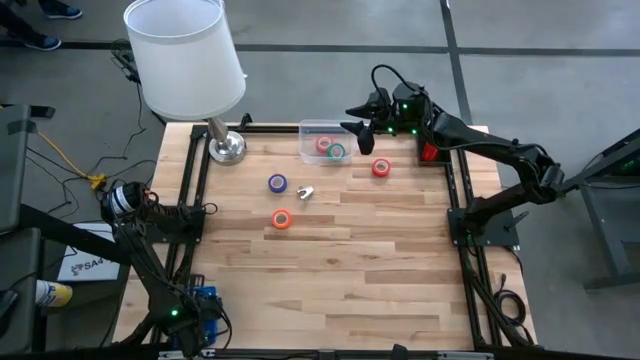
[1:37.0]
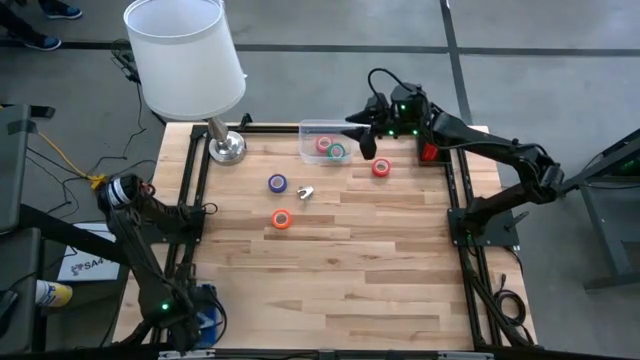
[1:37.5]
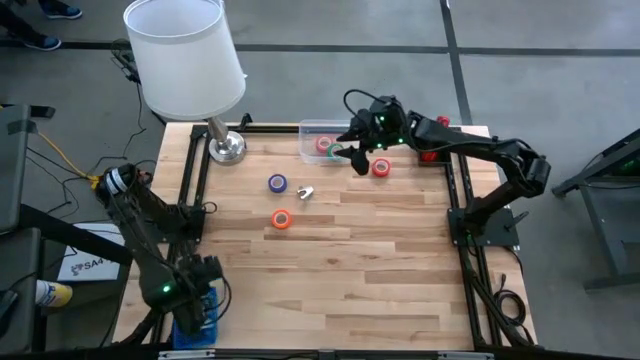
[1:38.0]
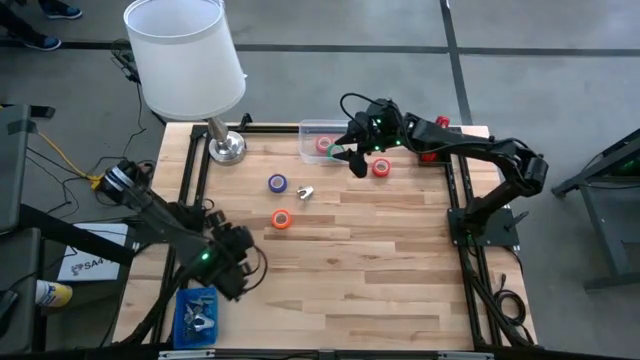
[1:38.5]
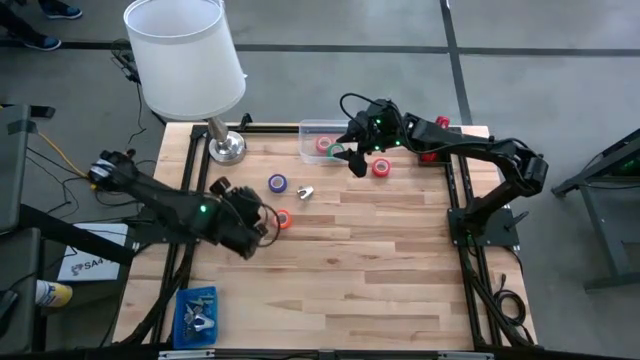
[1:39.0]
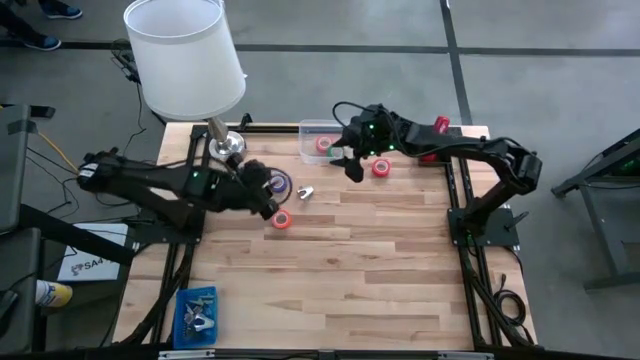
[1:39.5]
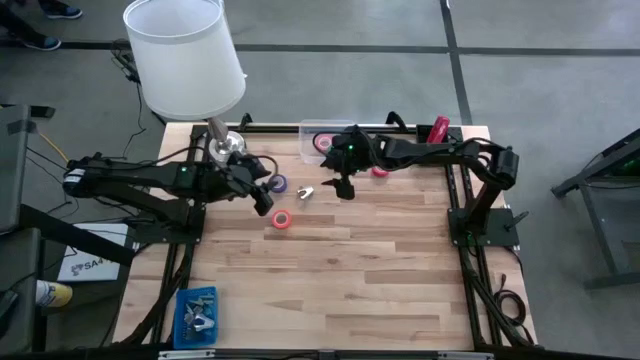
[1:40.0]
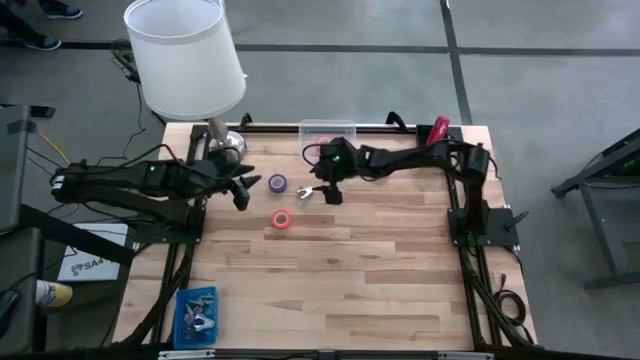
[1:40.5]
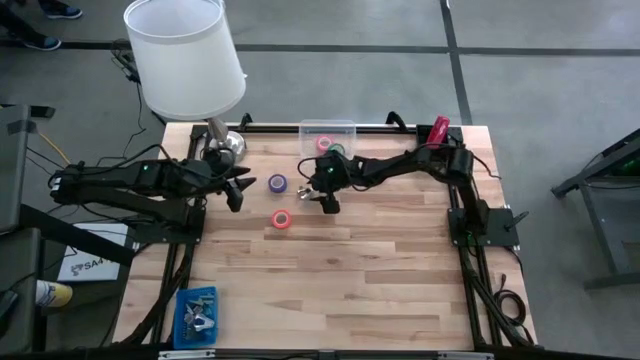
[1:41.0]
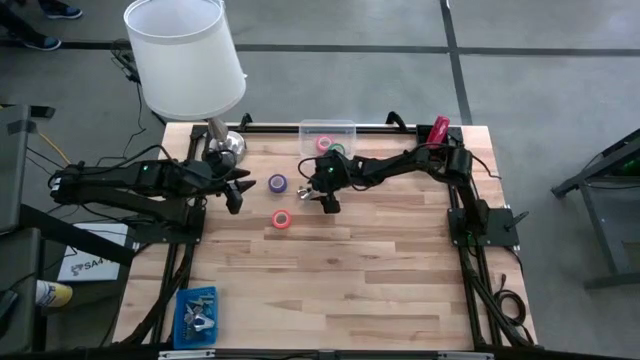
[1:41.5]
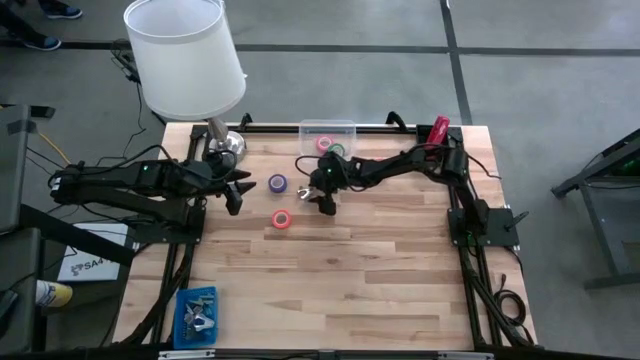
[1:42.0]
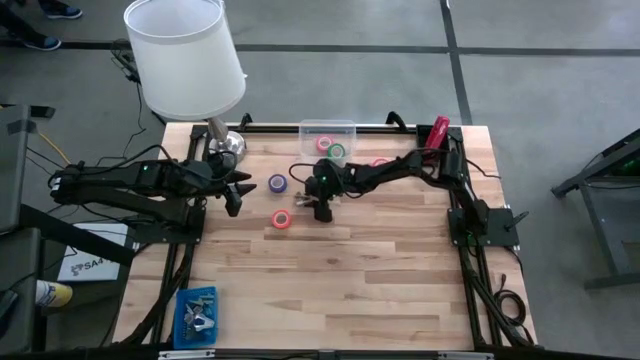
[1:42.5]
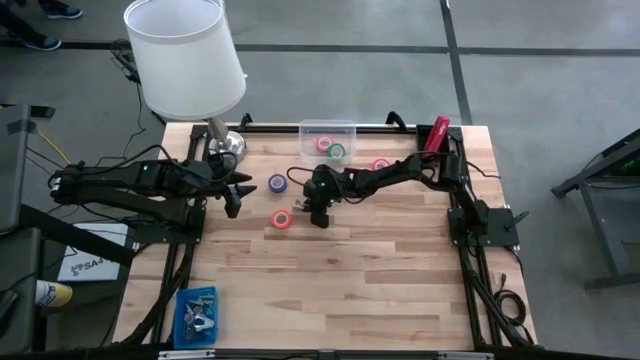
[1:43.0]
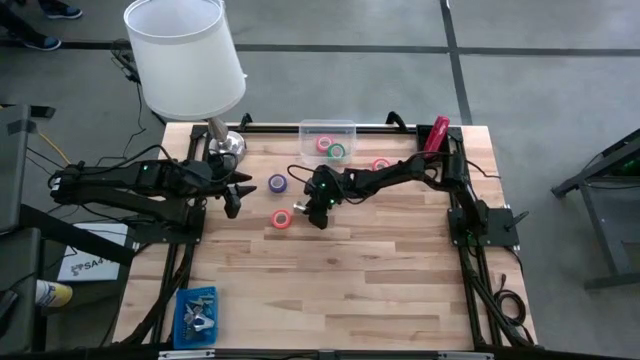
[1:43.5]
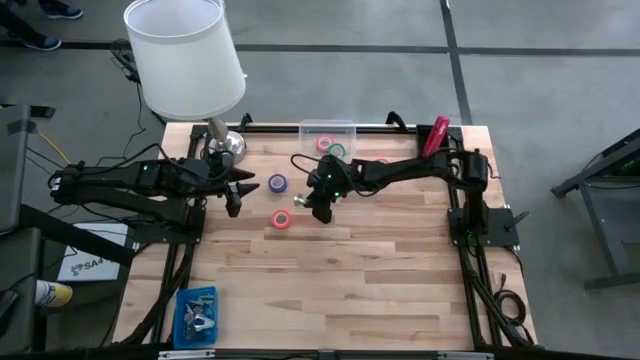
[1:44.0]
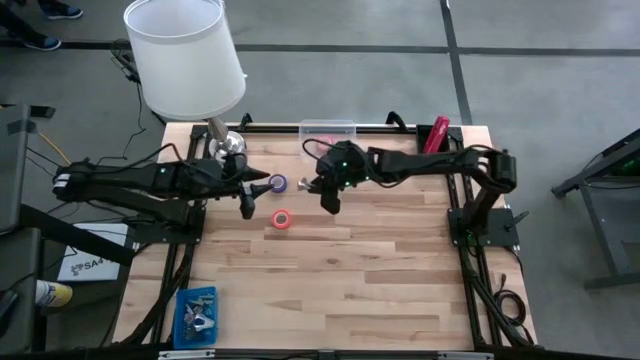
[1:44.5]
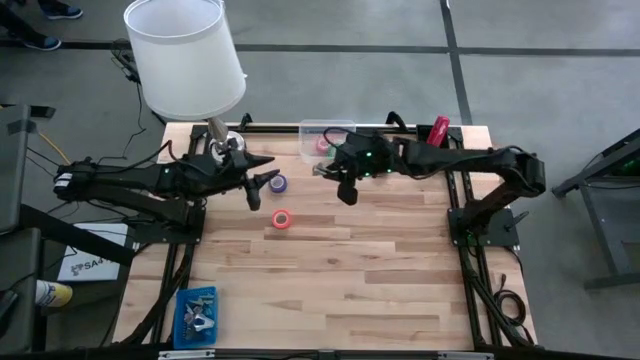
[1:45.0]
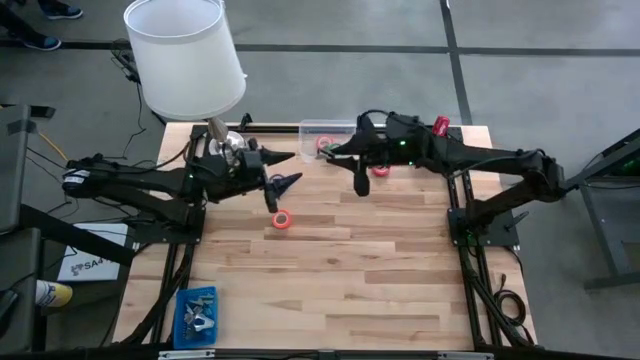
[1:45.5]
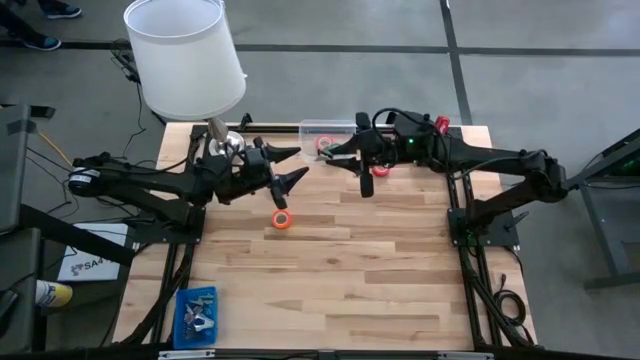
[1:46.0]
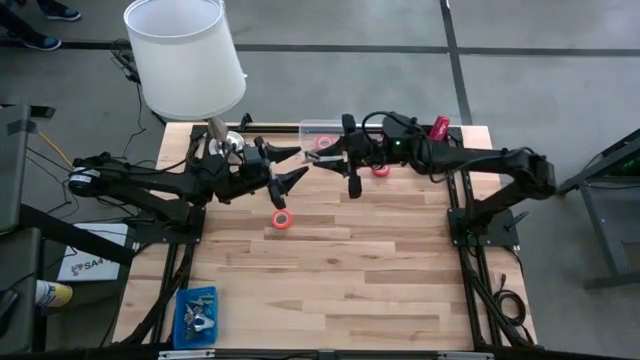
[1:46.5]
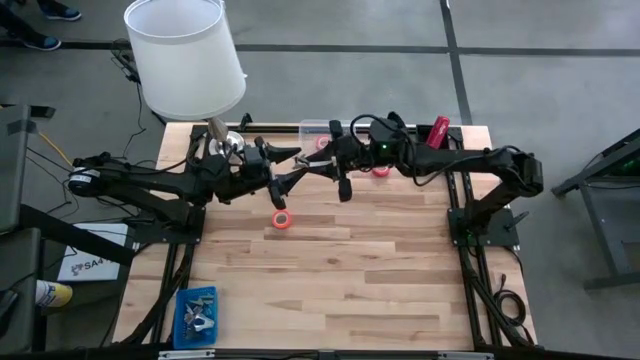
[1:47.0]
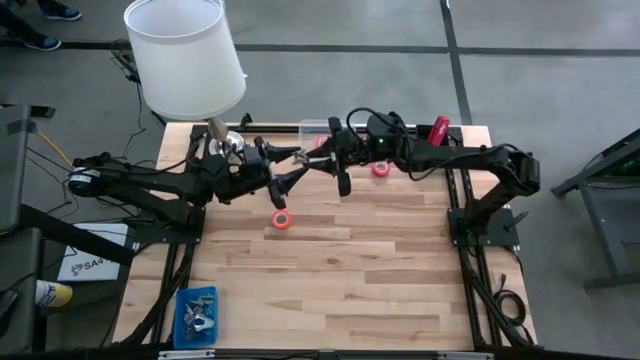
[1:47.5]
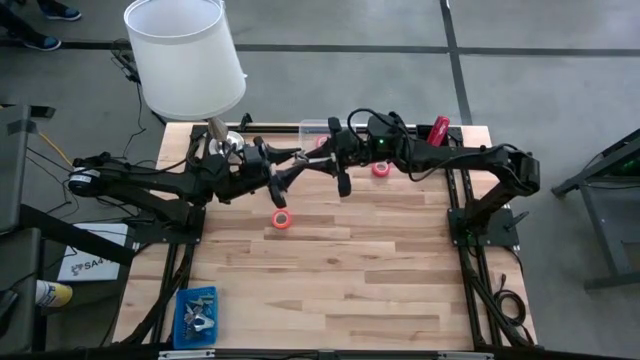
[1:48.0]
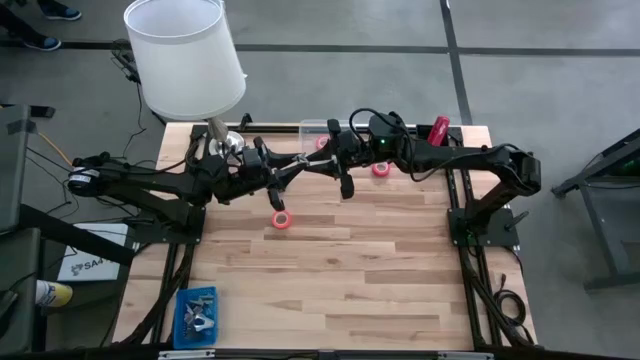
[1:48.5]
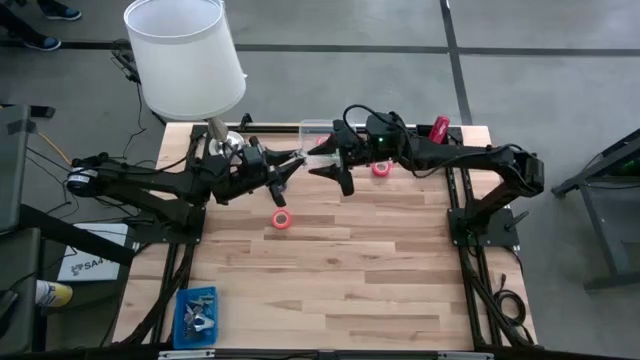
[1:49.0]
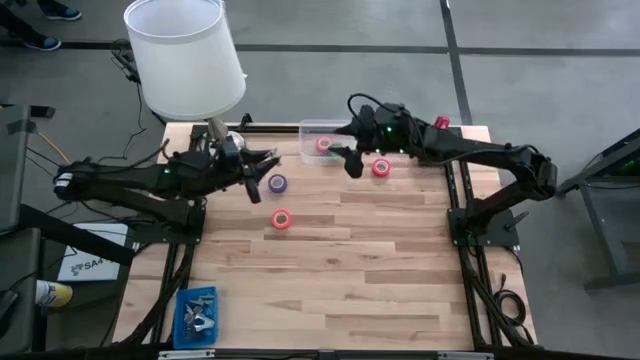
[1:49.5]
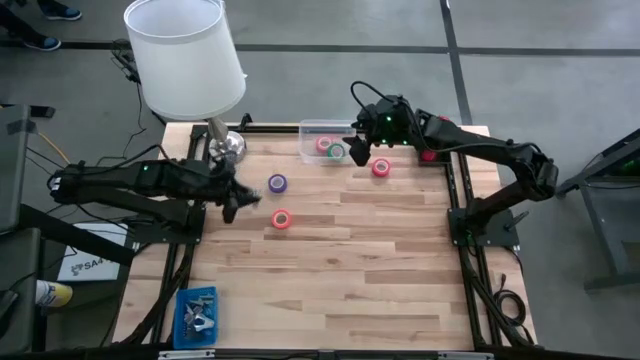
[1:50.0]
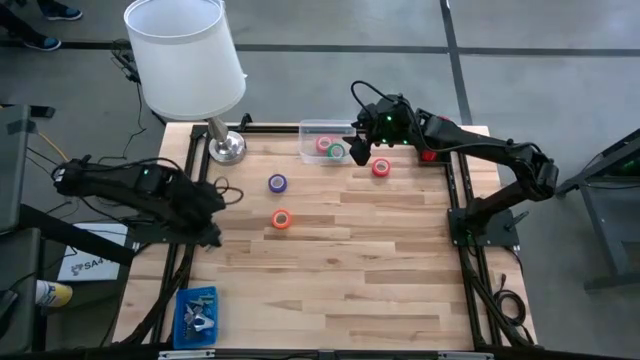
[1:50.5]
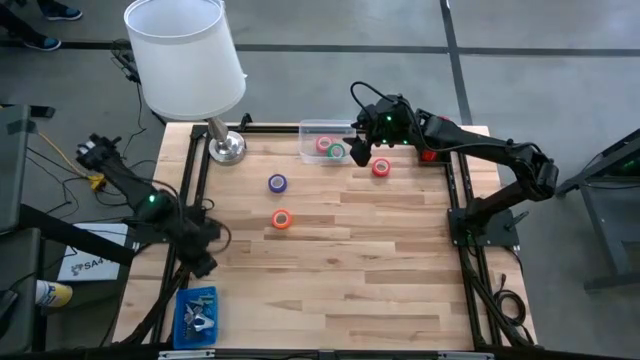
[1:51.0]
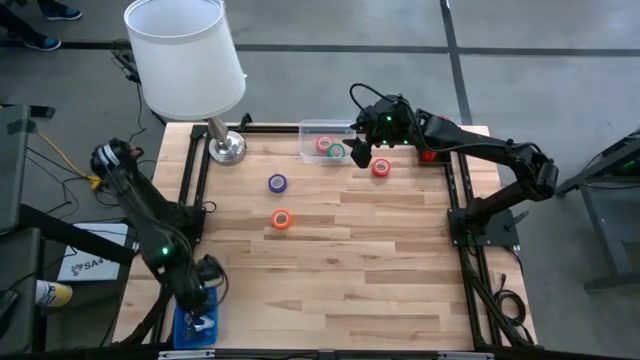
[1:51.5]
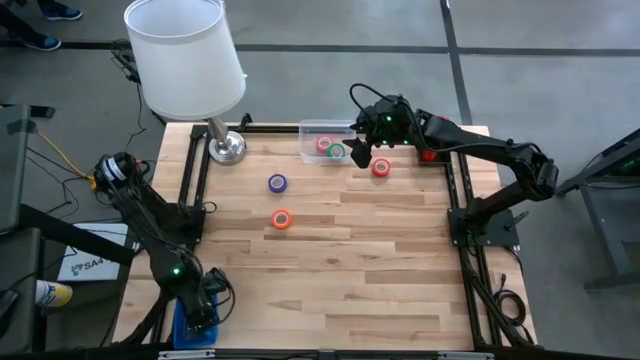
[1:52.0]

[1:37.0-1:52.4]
Task: Pick and place Stapler, Stapler remover, tape
Put the gray staple remover into the blue bin

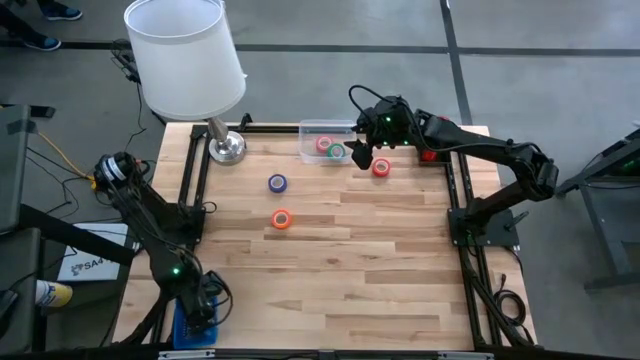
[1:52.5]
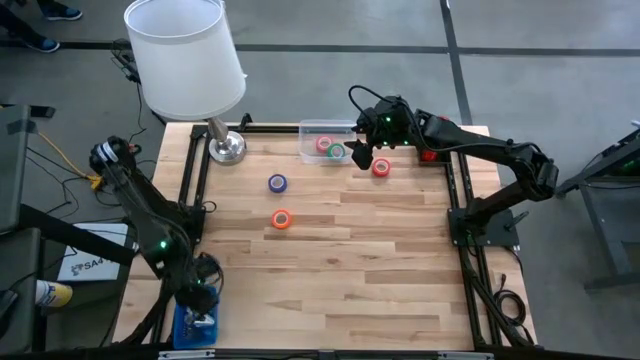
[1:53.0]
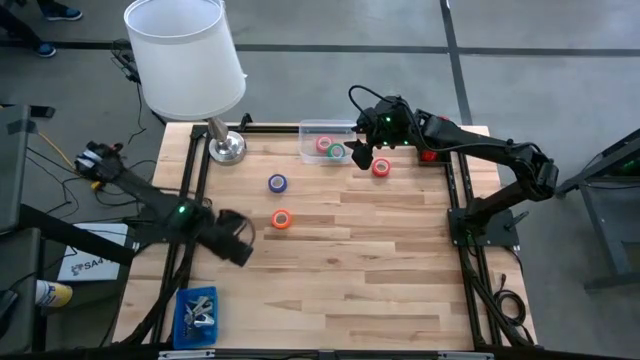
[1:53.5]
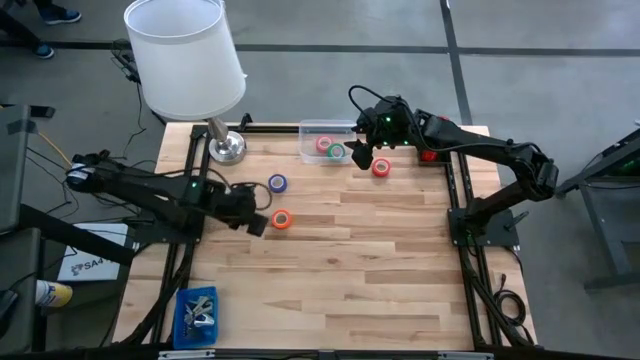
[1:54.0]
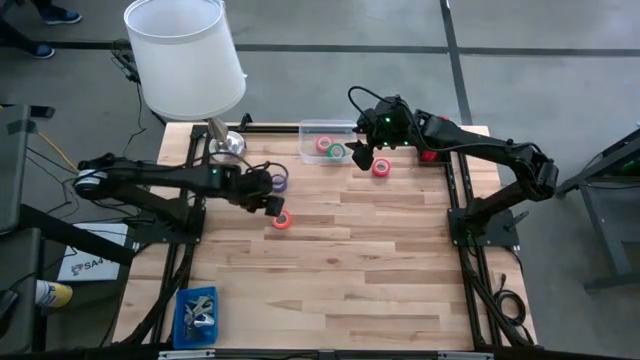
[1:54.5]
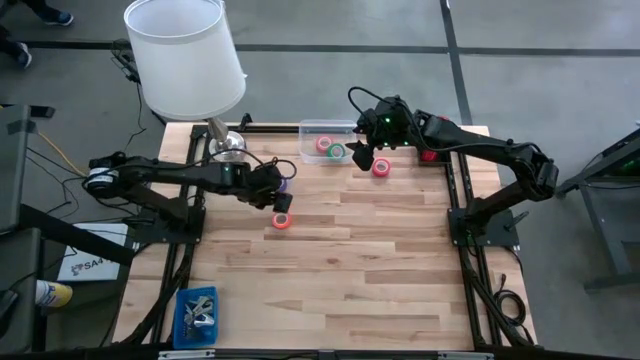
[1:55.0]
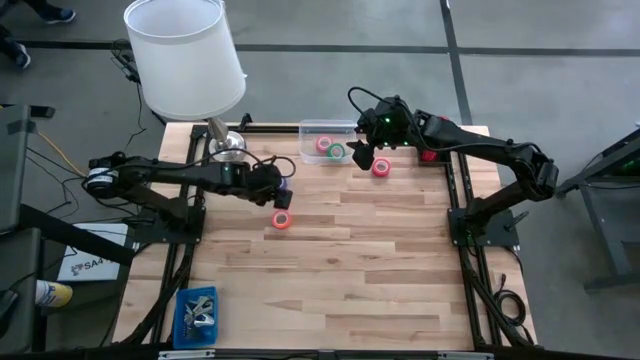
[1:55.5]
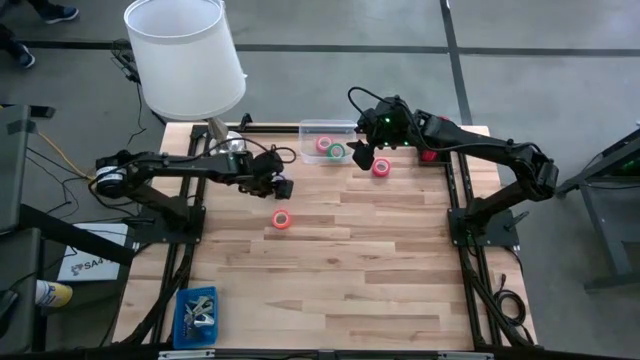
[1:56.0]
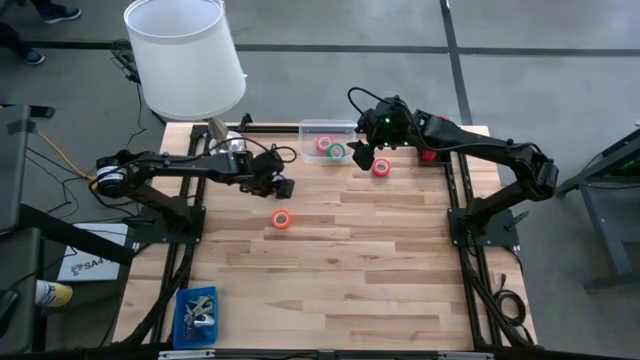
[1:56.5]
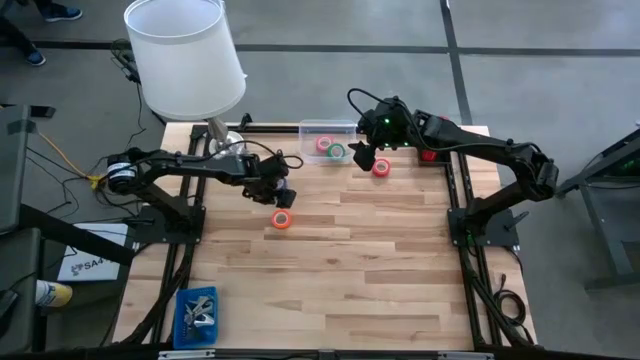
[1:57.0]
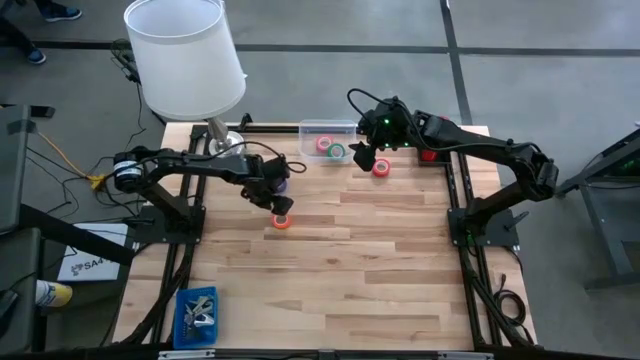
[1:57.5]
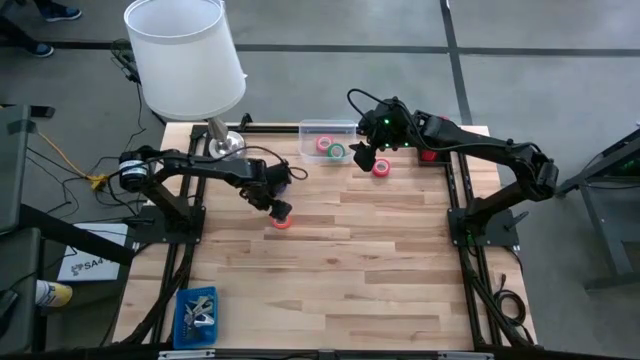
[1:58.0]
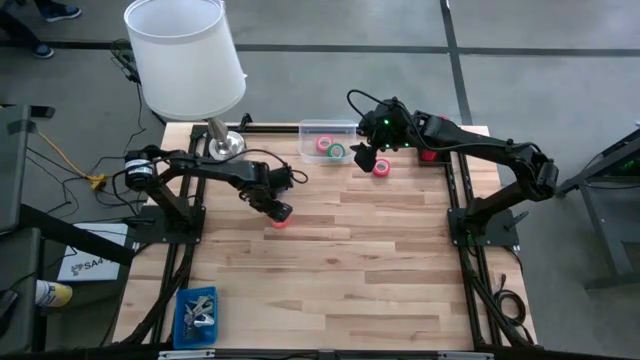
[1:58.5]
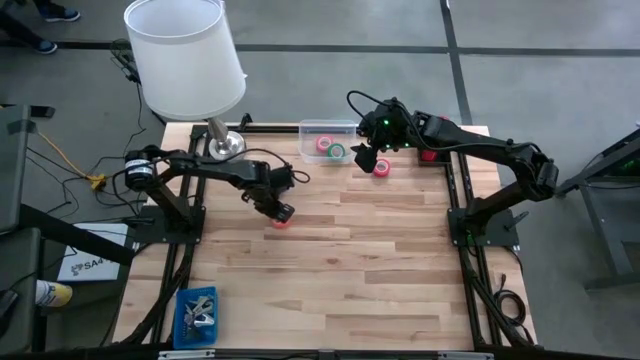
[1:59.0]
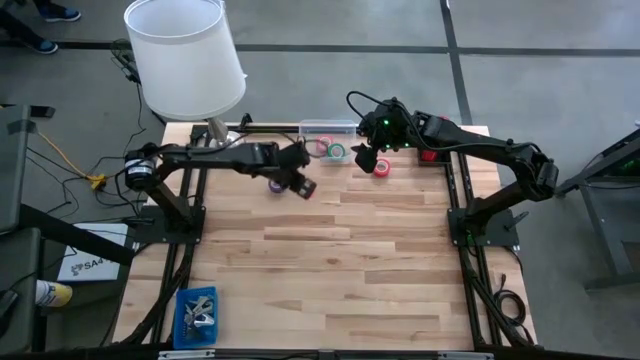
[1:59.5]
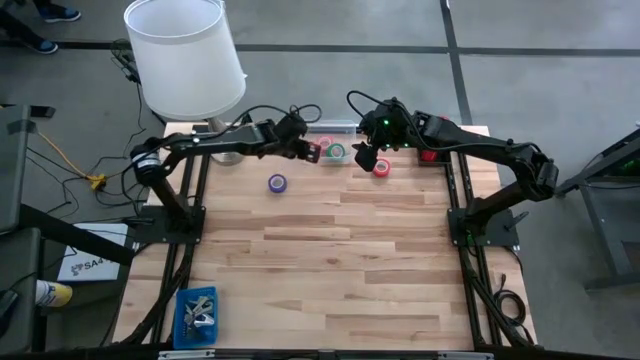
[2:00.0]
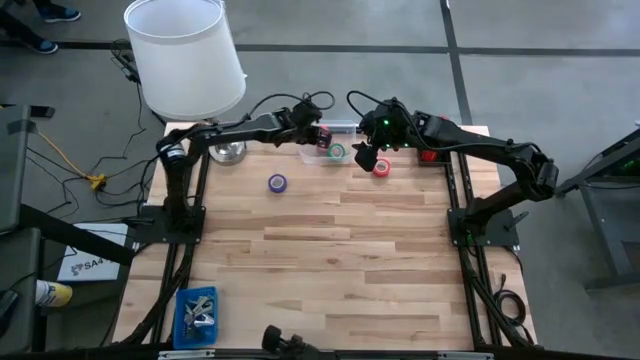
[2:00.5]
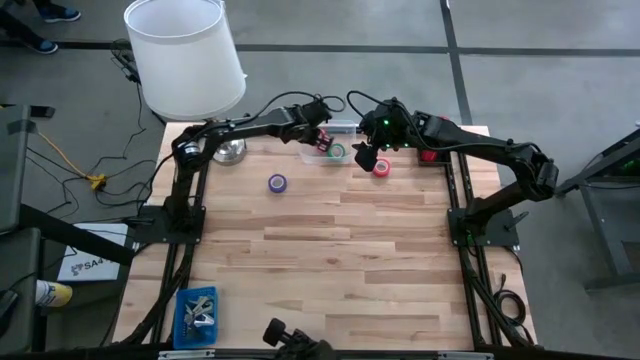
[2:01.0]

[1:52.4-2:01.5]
Put the orange tape into the transparent bin
